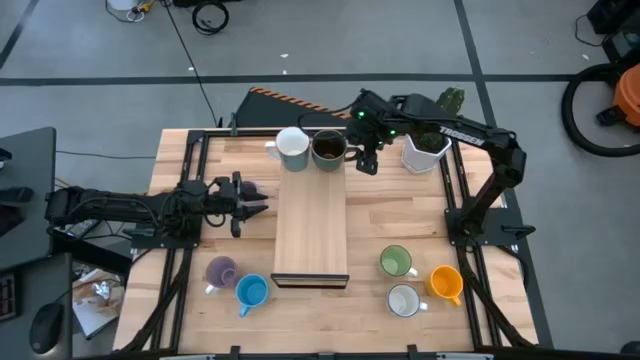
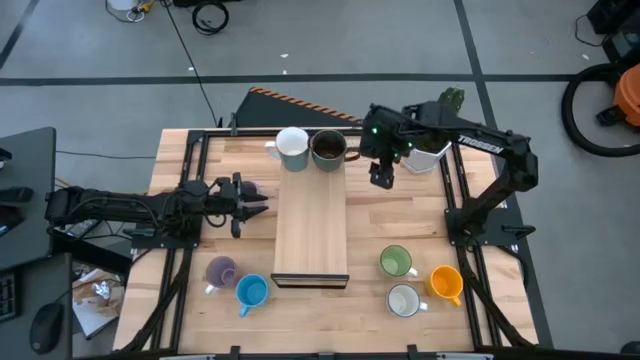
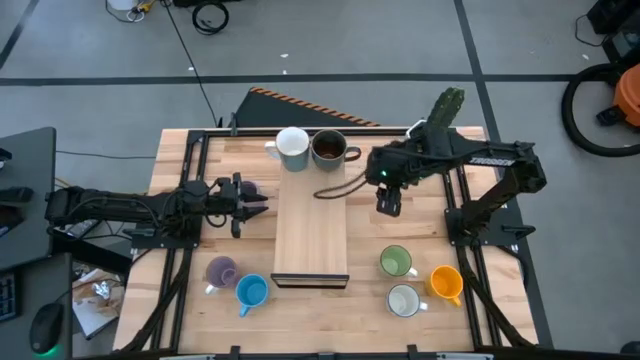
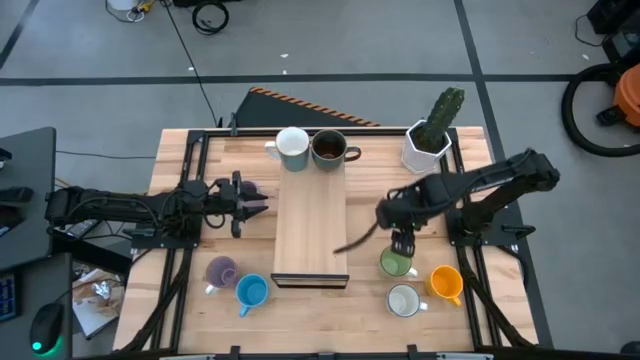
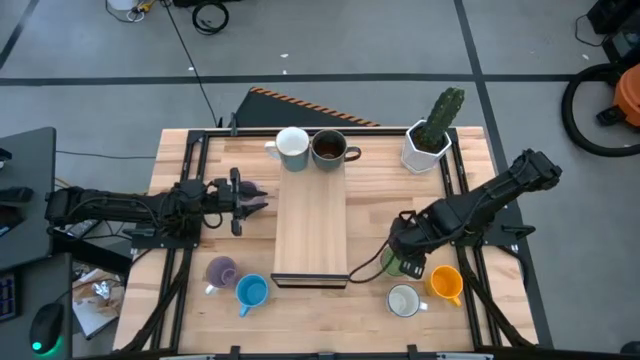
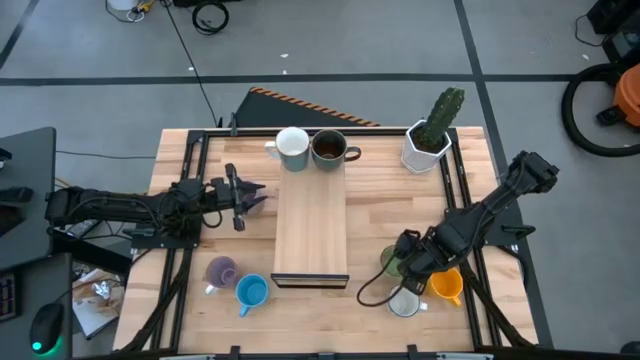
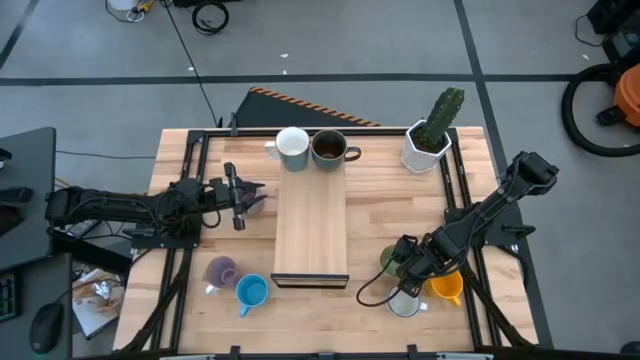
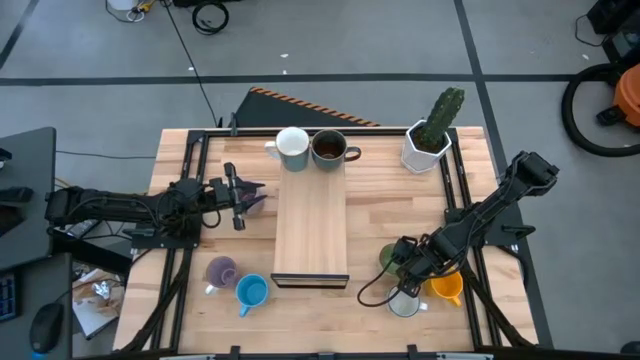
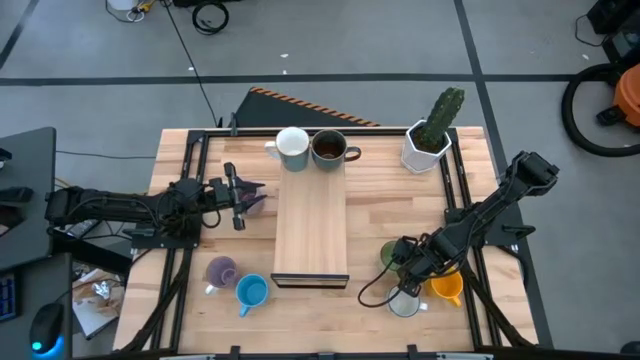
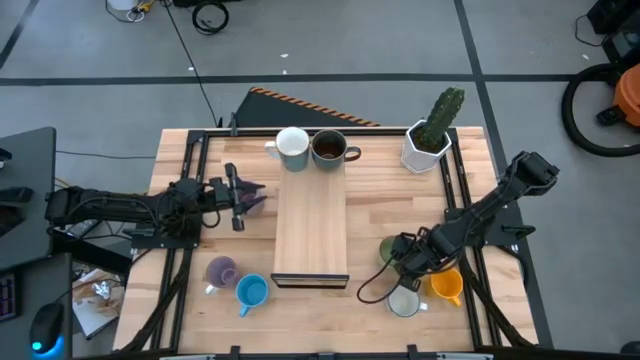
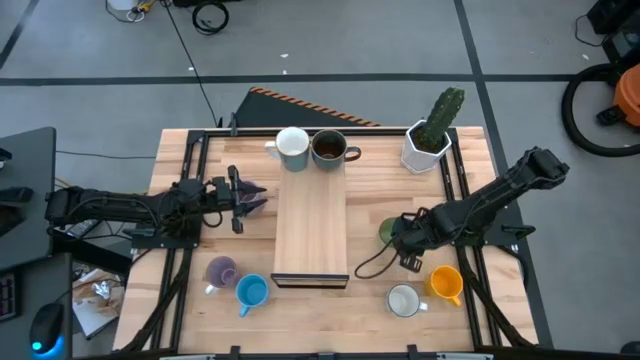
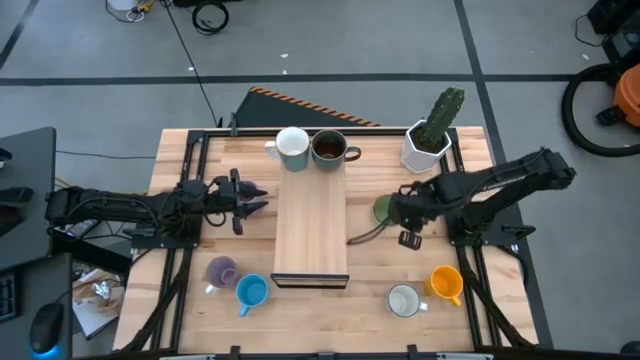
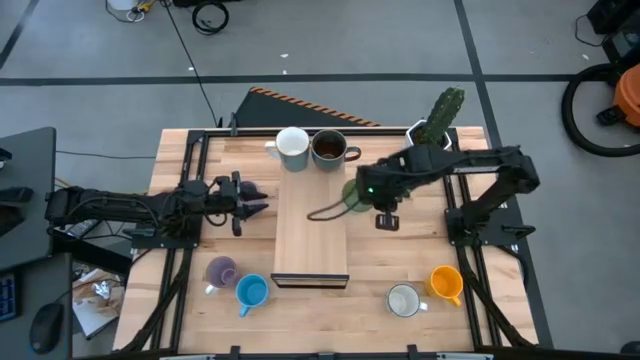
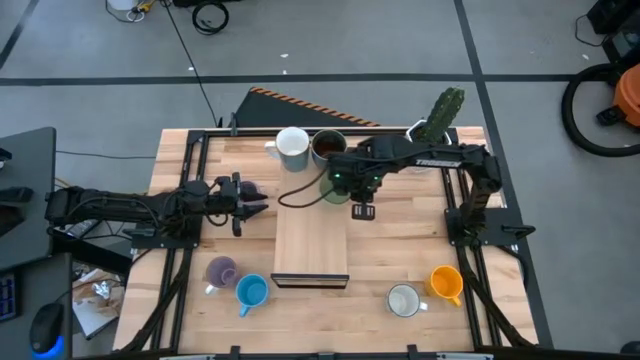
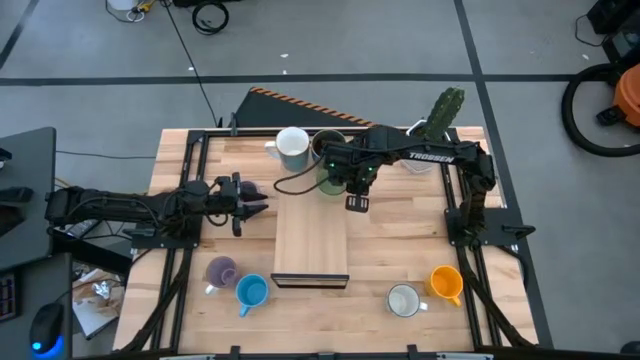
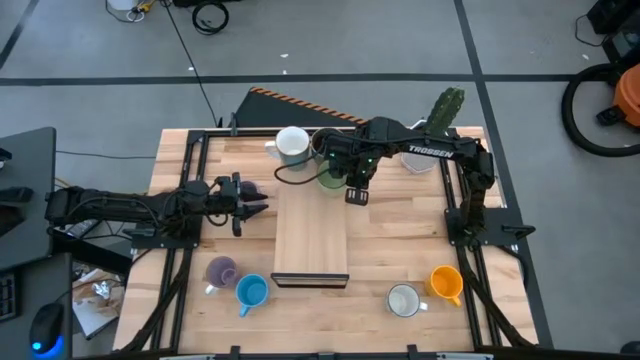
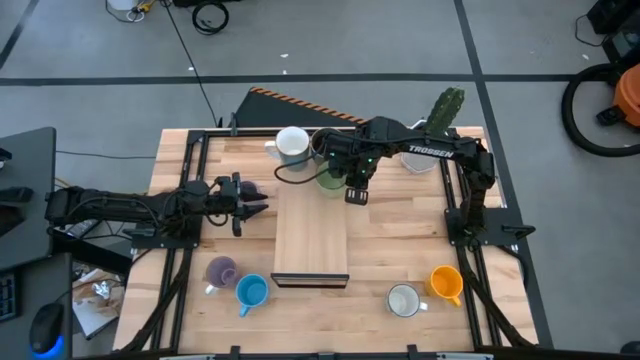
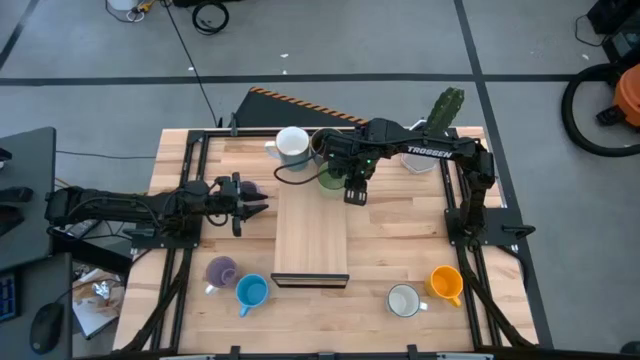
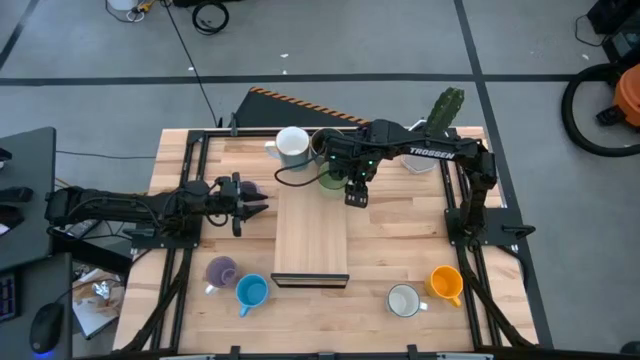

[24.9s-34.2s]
Task: Place coffee mugs
Put the green mug on the shelf

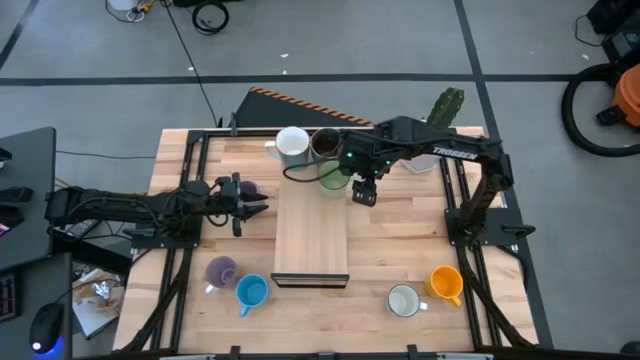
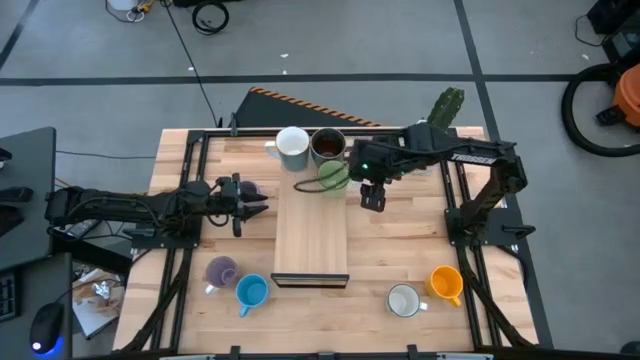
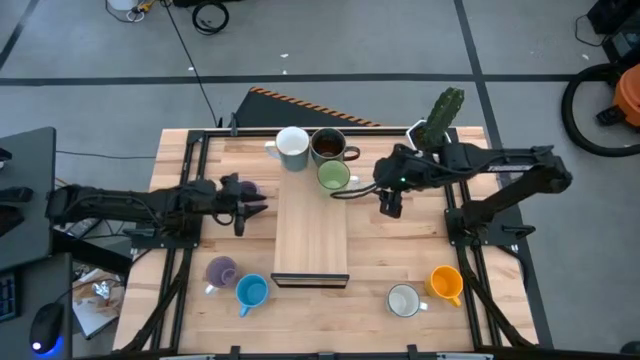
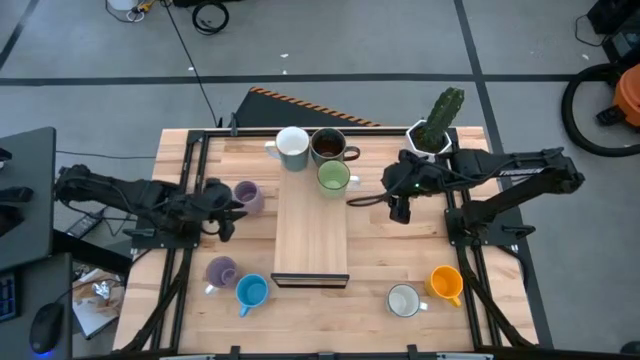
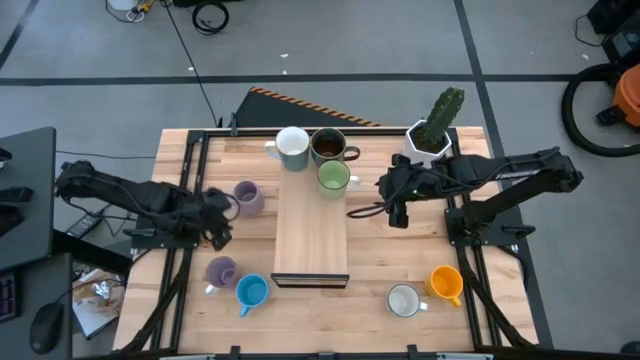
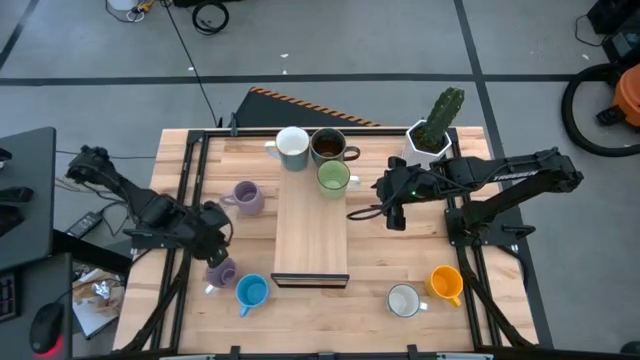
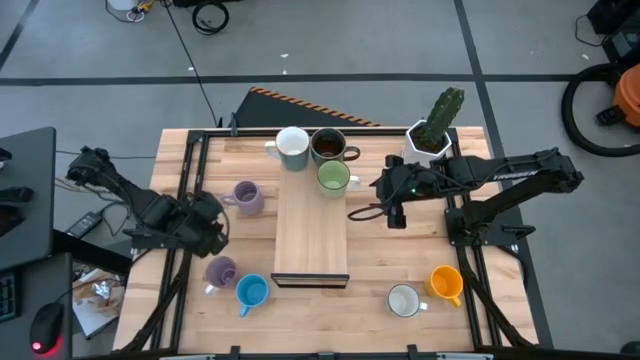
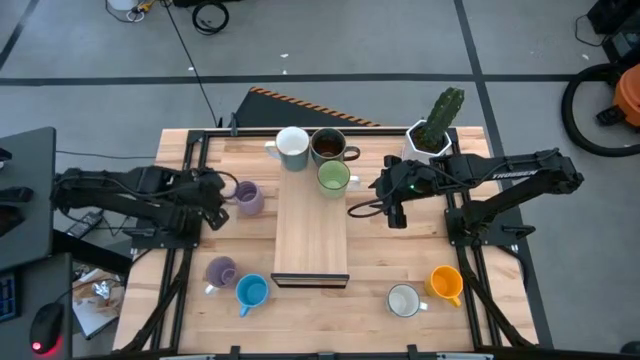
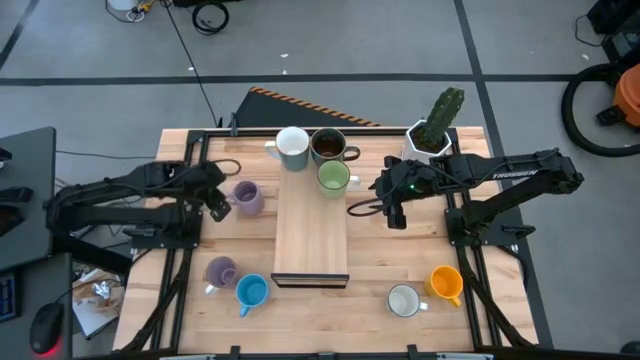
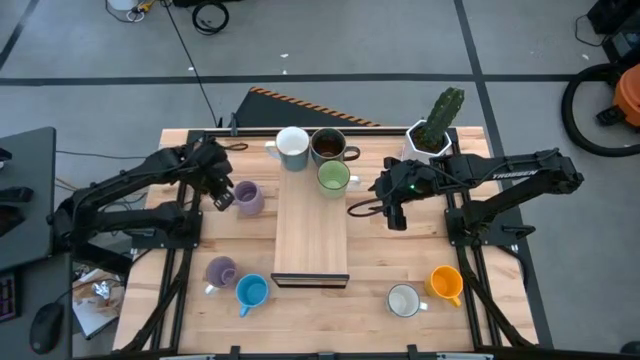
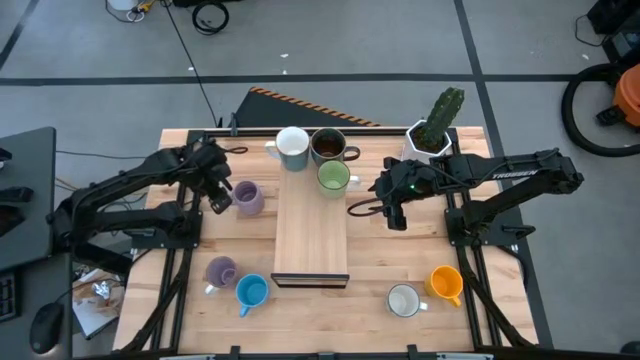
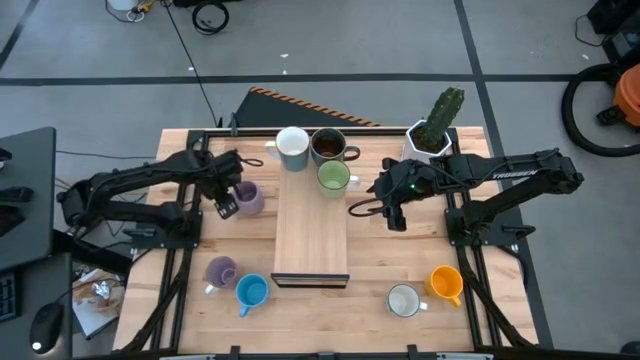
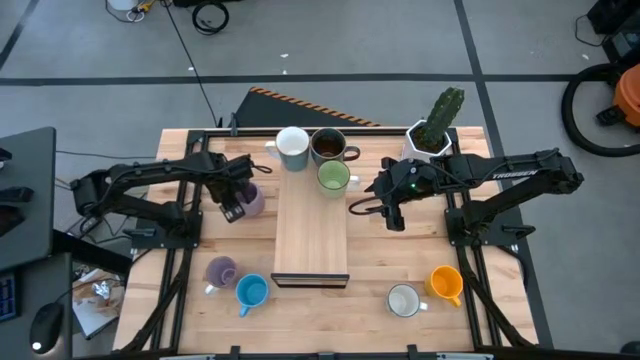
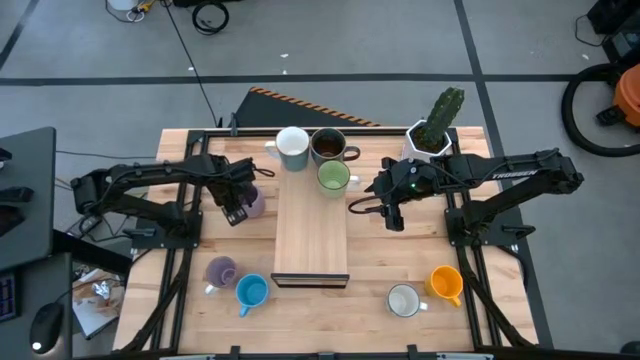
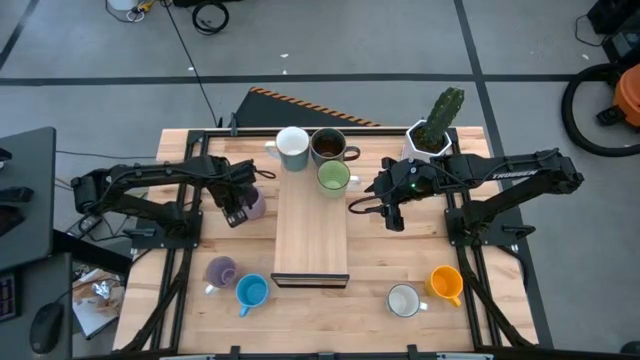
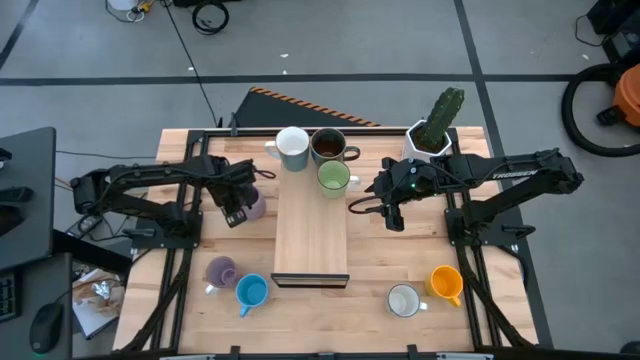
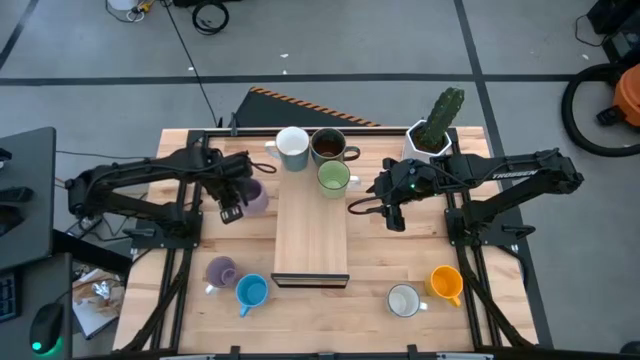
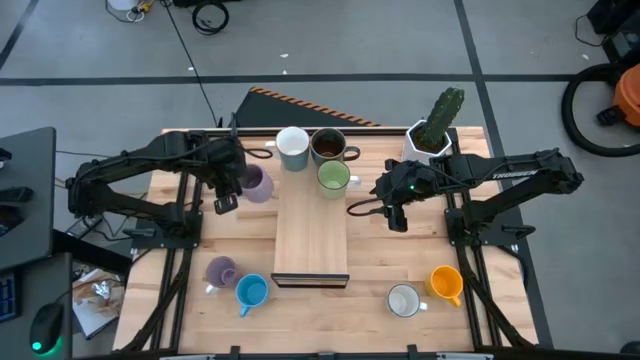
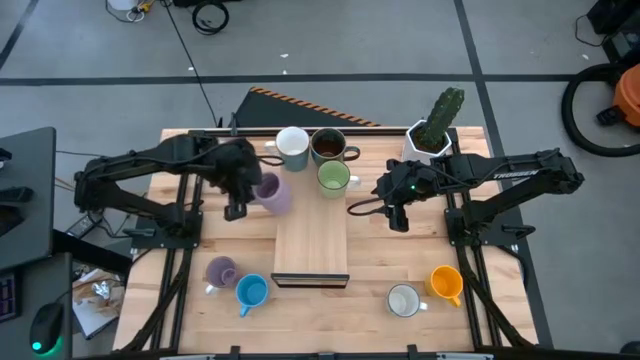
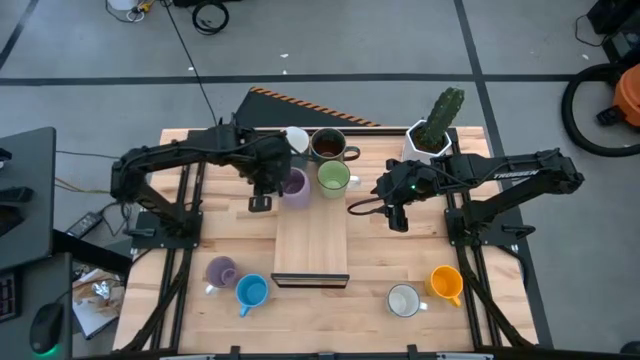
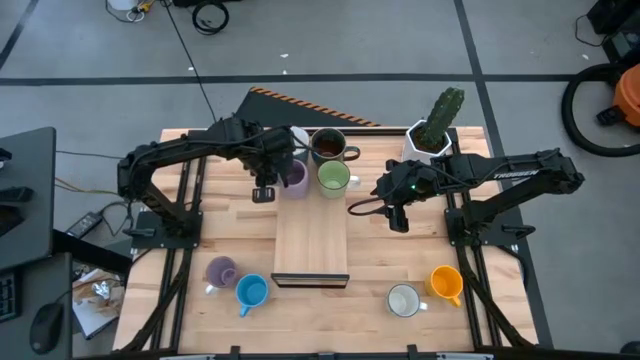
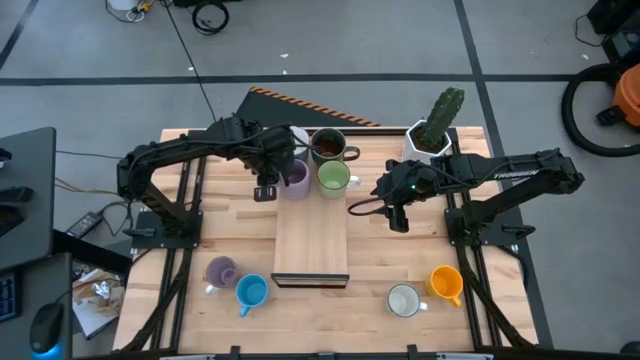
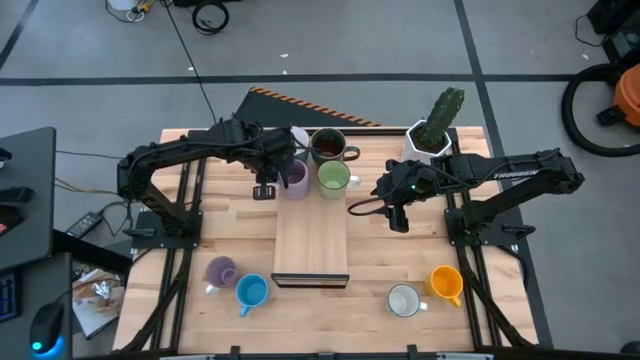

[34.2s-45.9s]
Put the top purple mug on the shelf
